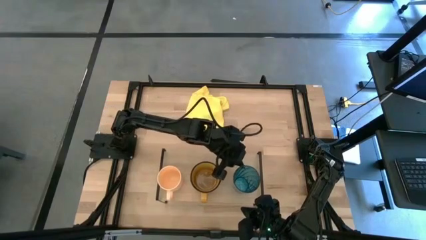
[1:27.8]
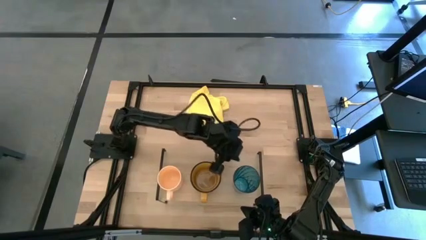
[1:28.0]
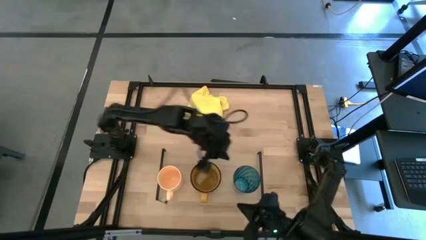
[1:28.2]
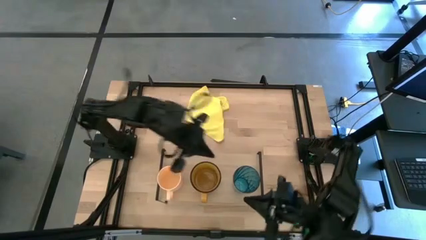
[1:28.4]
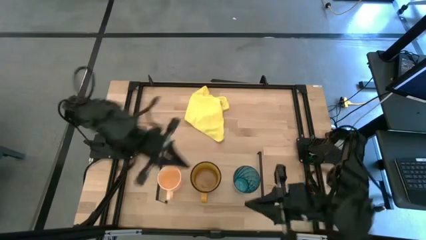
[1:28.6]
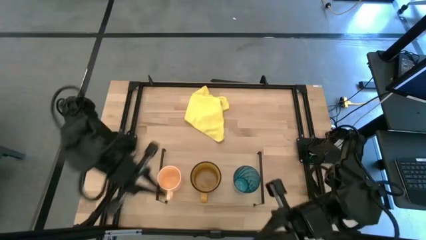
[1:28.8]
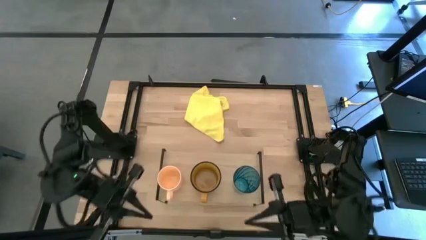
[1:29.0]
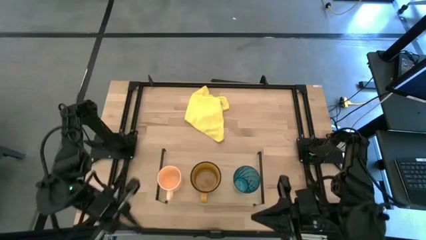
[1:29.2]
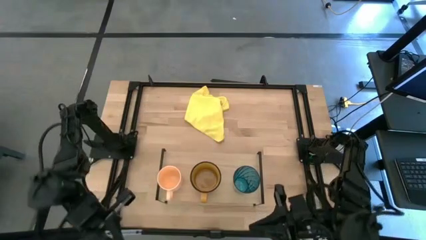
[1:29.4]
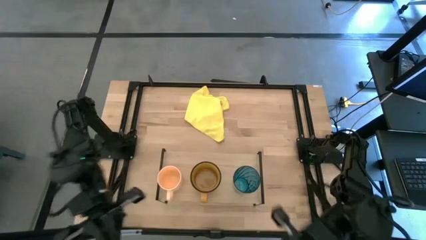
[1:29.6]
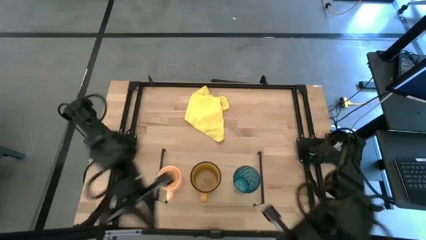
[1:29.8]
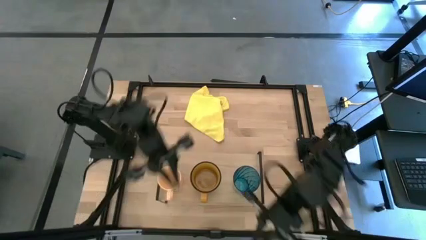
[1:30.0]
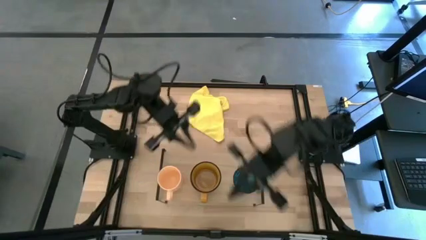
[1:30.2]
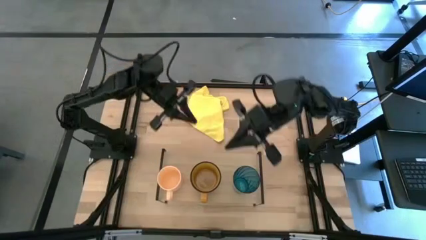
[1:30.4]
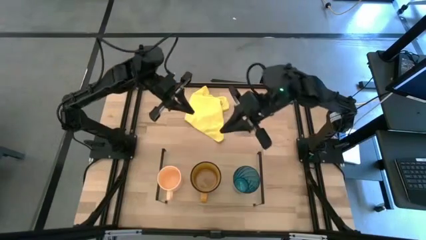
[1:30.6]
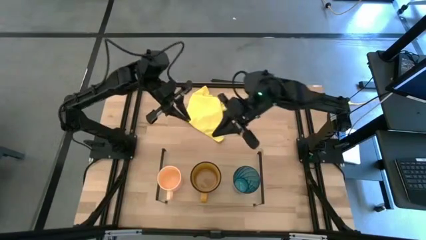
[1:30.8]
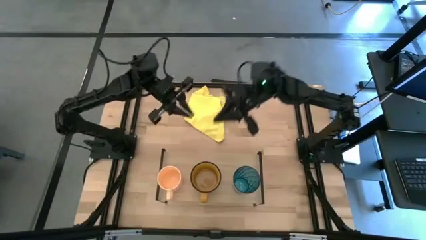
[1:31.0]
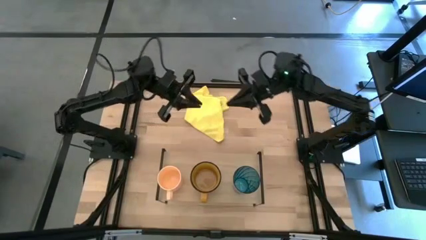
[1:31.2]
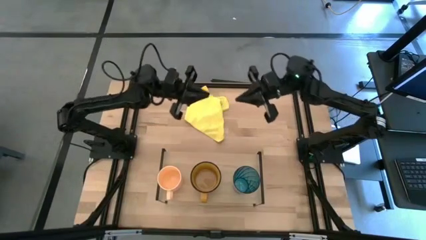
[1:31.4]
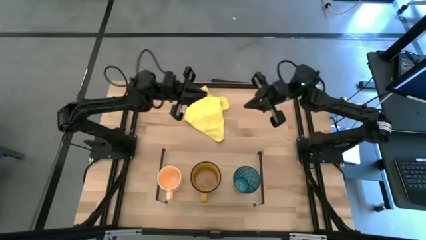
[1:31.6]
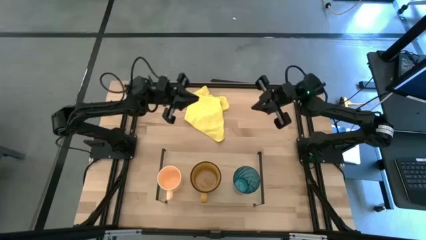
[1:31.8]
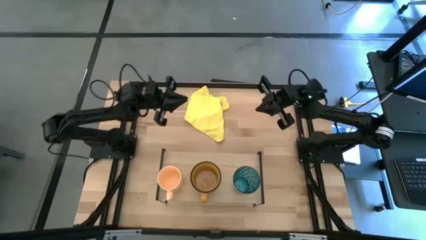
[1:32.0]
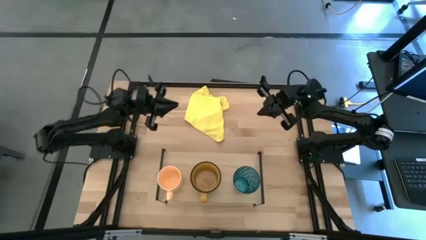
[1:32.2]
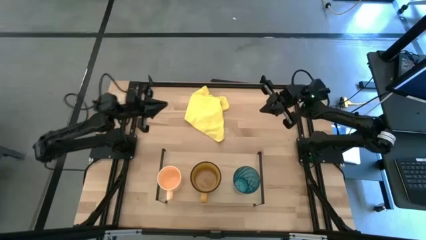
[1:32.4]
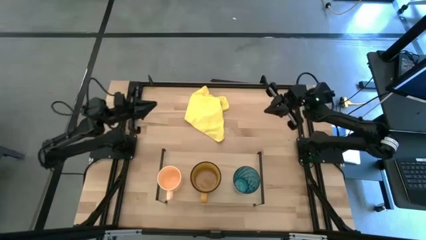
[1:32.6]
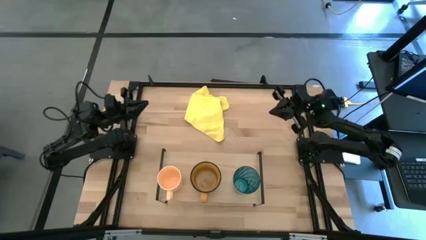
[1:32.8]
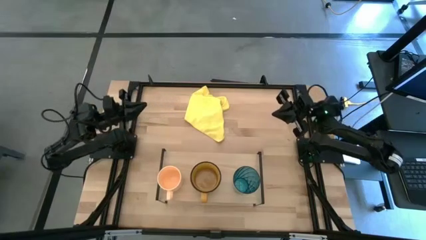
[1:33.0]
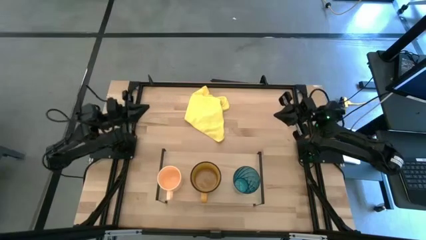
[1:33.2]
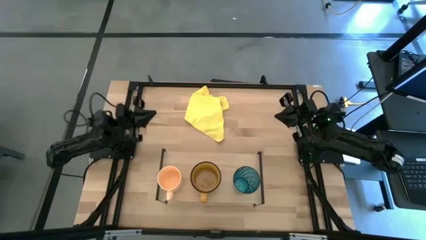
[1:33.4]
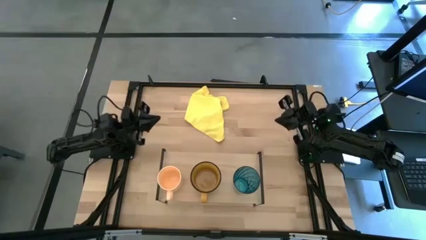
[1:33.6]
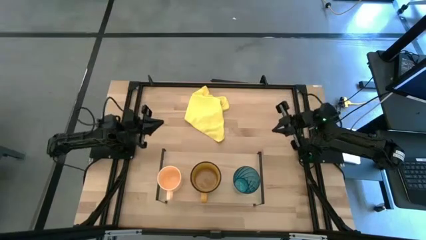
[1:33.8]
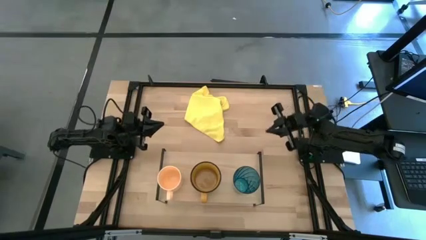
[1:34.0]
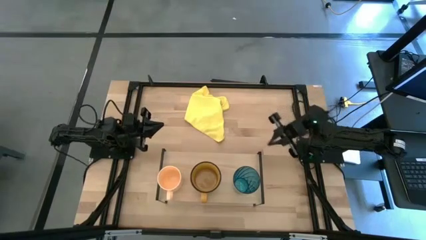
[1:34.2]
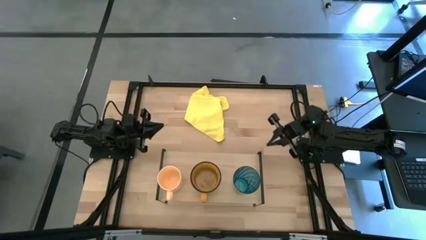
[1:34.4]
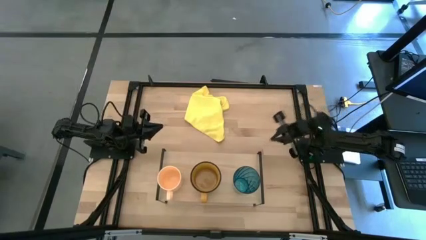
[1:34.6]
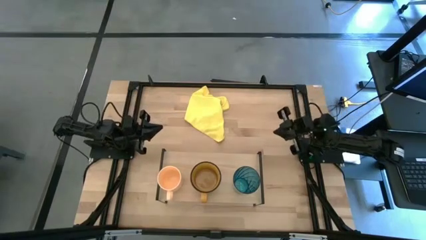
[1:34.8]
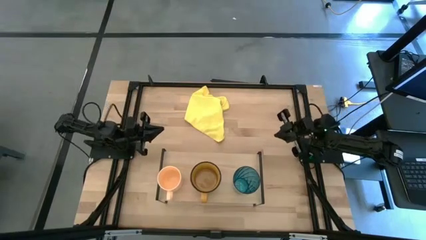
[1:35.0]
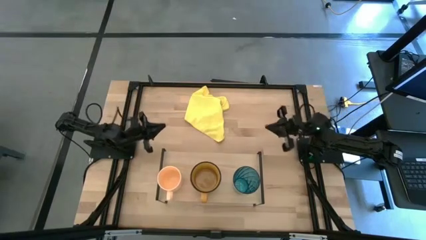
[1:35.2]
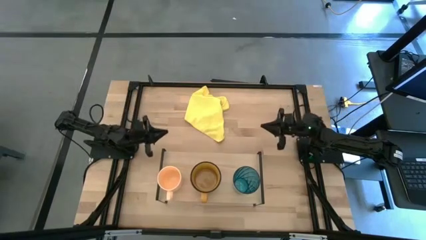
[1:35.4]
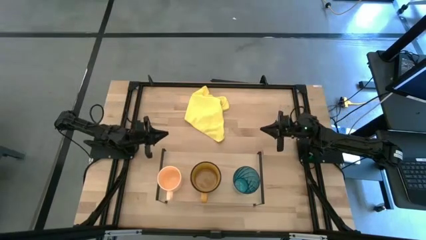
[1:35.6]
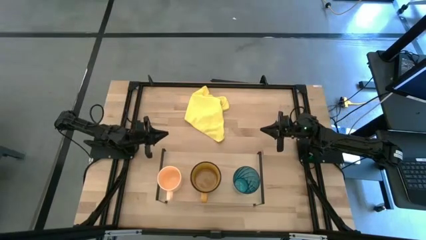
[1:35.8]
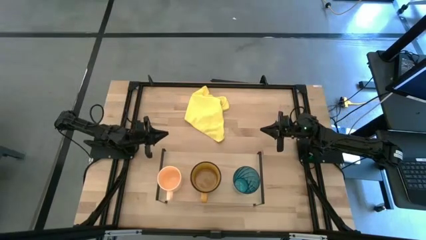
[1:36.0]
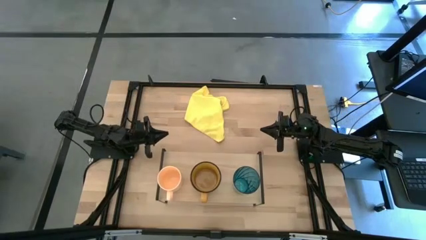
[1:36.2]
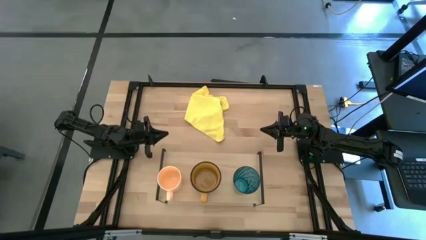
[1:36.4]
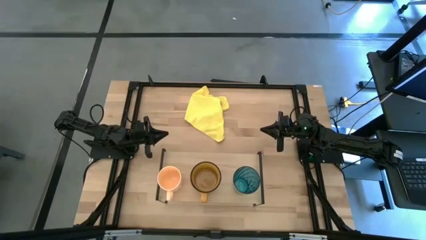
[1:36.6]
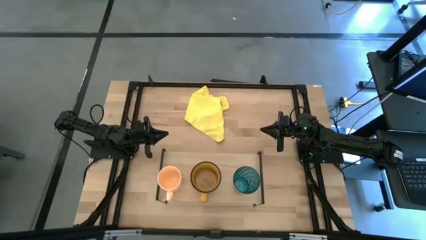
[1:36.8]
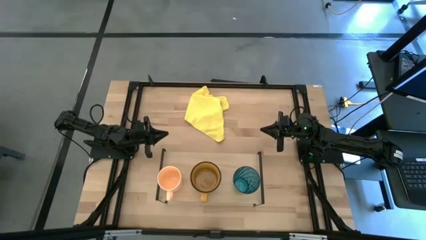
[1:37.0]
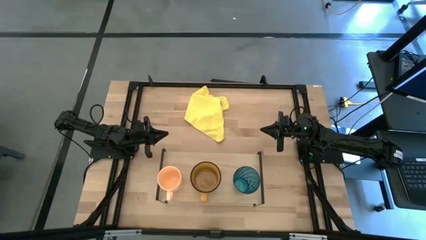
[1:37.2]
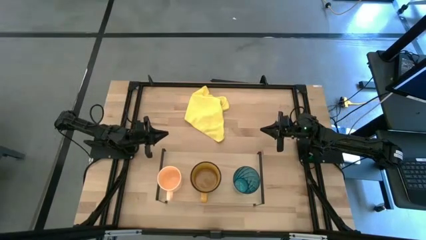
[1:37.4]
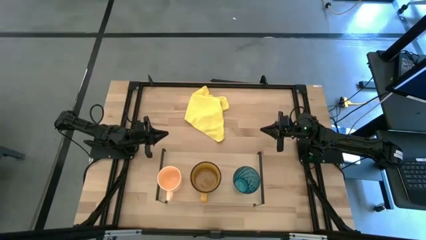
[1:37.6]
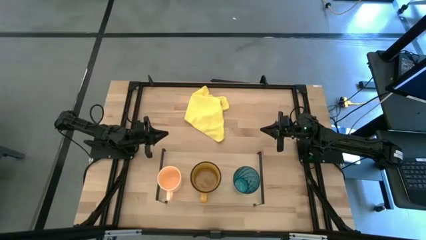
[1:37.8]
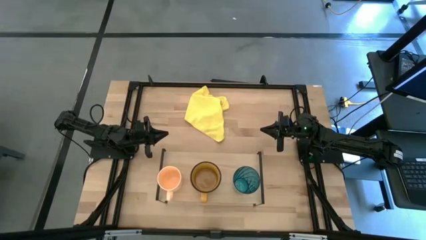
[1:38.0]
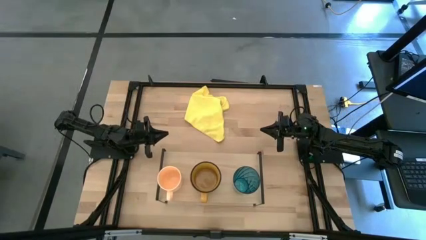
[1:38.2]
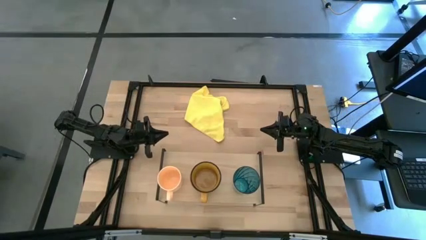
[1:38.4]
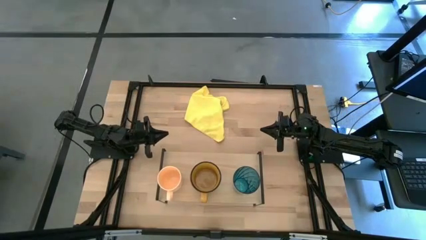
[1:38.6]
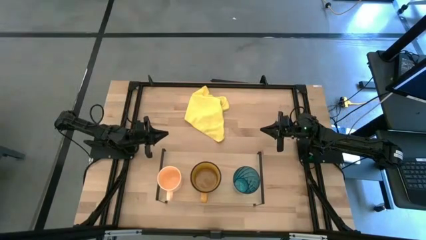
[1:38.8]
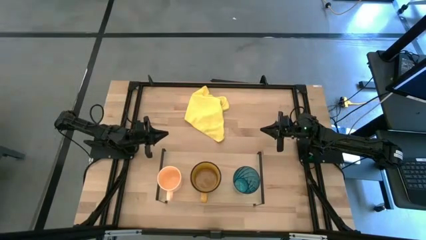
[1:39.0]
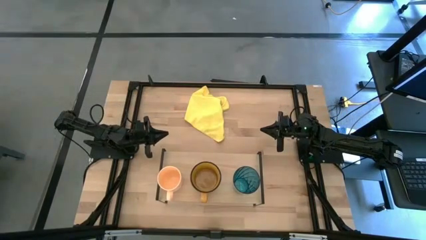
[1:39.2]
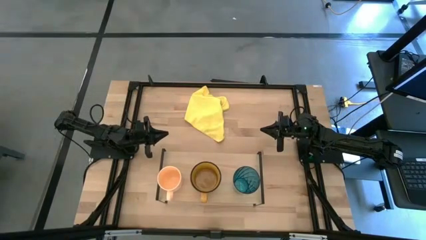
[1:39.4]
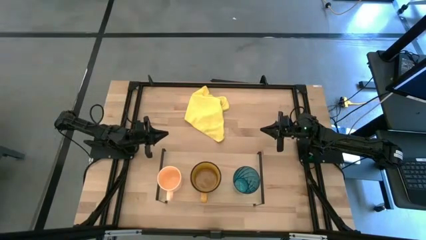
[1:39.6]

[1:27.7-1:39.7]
Task: Stack small to large cups/mugs on shelf
Return to Home Position

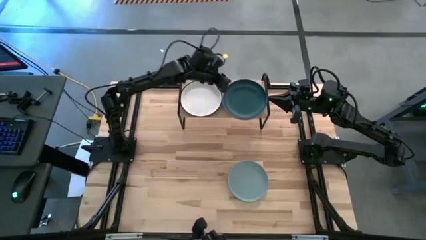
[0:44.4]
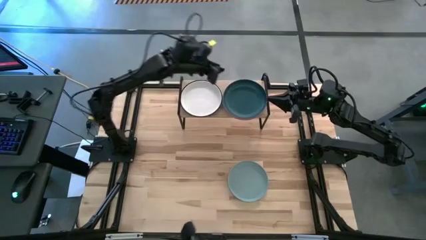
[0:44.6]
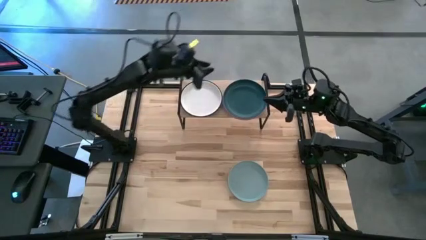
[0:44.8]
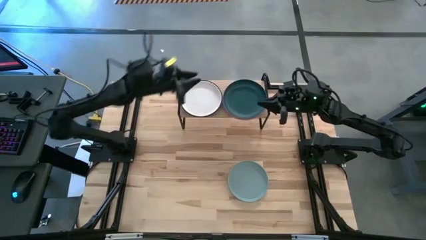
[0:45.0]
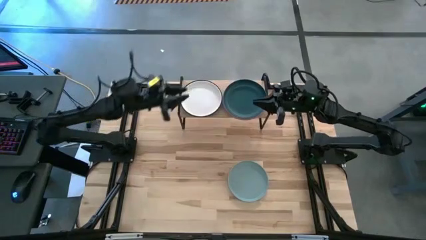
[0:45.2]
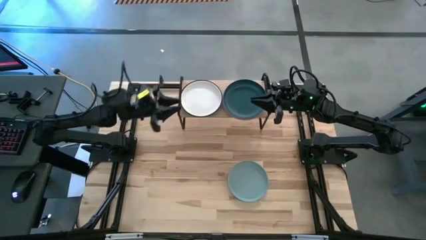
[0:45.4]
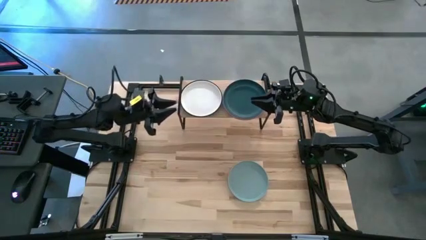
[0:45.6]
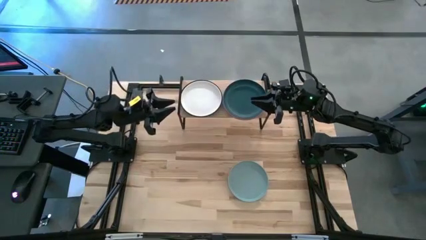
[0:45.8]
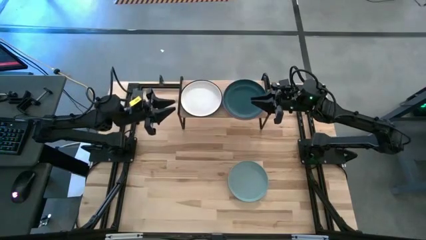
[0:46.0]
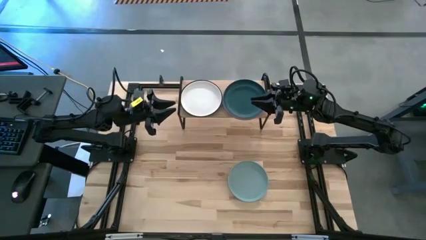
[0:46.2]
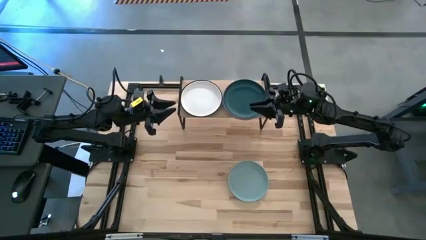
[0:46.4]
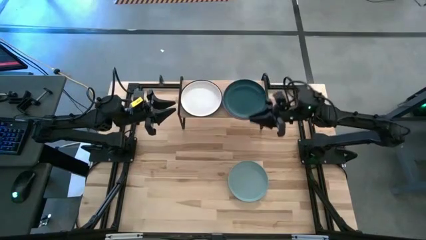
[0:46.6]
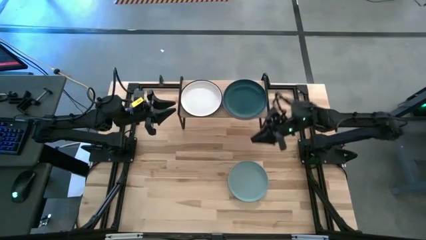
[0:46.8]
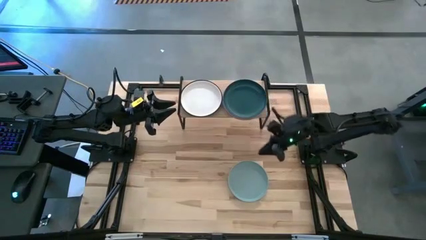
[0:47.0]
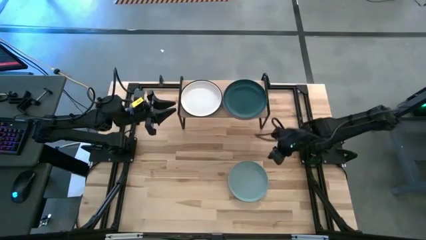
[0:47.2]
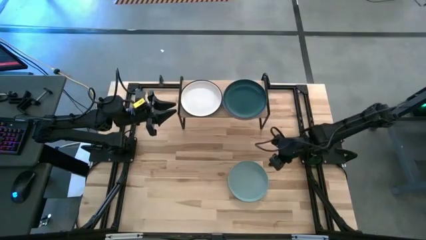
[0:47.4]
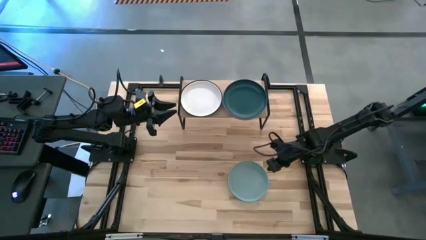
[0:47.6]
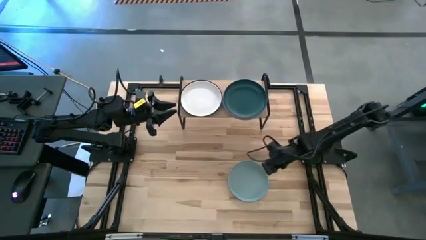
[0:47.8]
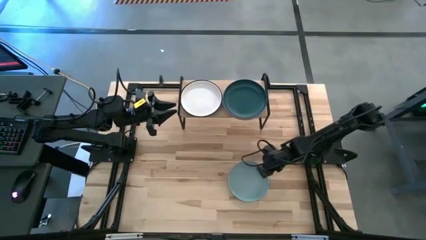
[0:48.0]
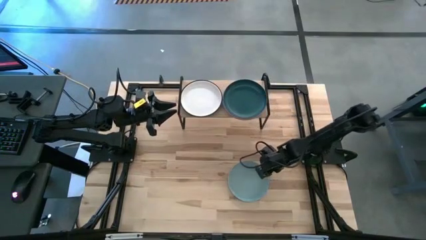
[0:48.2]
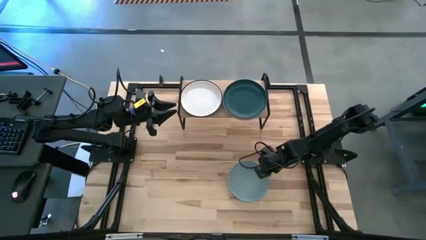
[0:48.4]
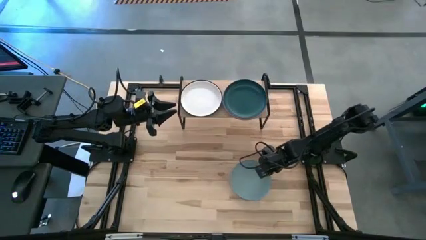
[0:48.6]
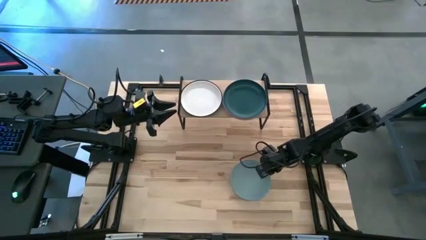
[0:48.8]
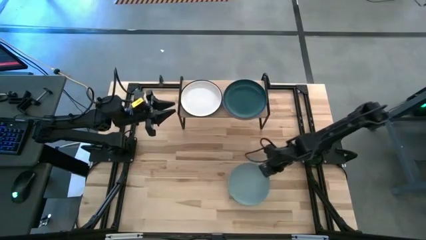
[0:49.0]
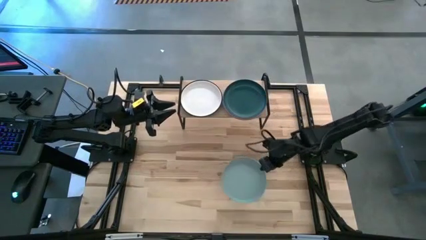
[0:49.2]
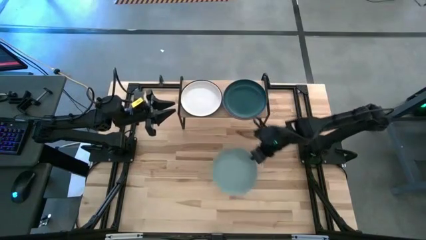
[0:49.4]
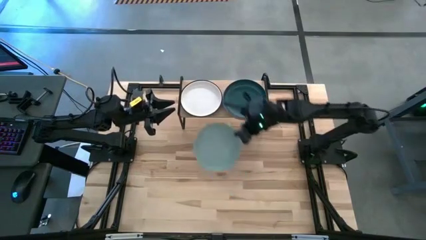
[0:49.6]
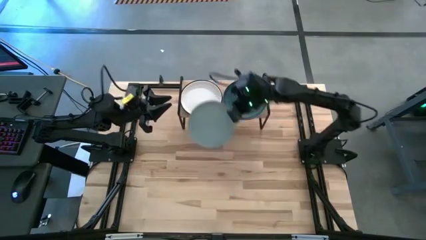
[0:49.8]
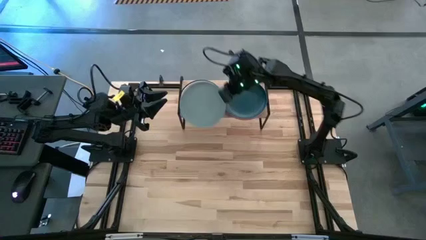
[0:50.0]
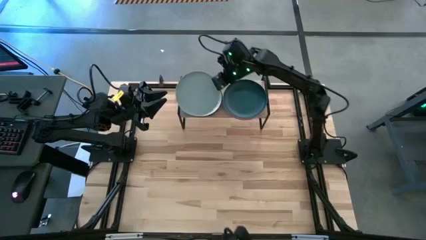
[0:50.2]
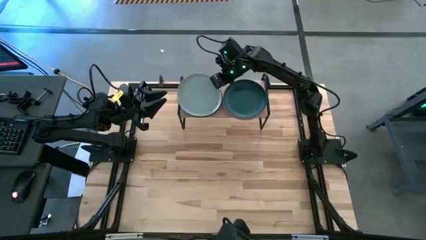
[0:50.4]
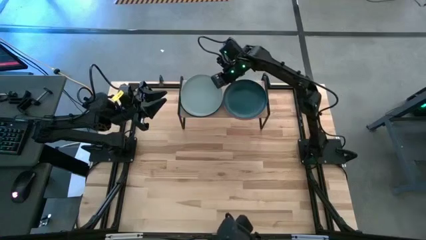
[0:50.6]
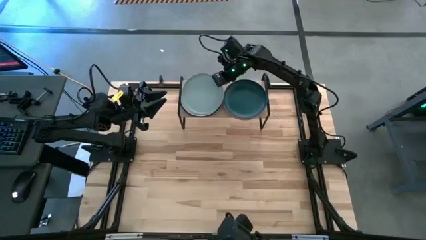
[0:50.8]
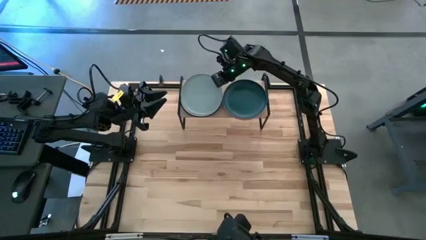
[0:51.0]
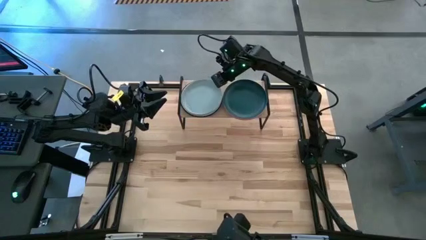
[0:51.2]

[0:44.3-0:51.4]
Task: Place and stack plates onto a shelf
Stack the gray plate on top of the white plate on the shelf
